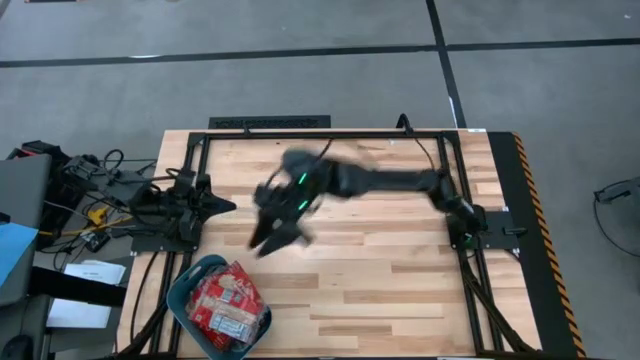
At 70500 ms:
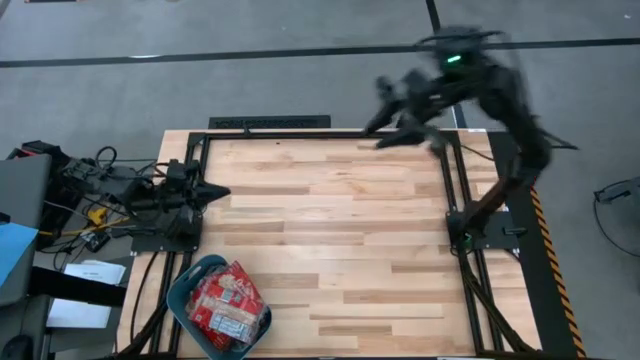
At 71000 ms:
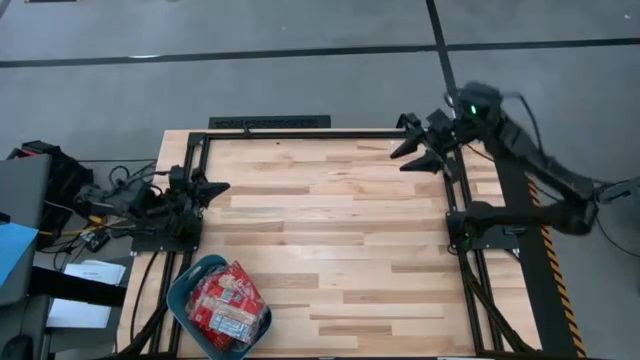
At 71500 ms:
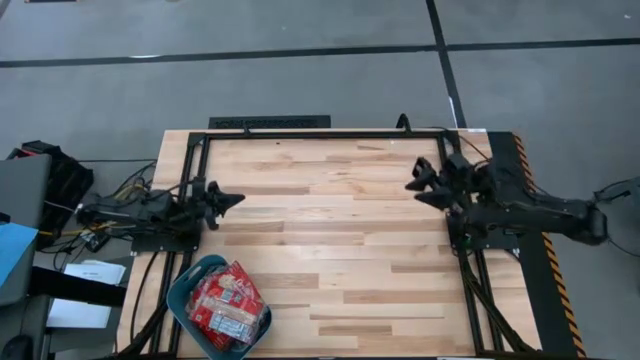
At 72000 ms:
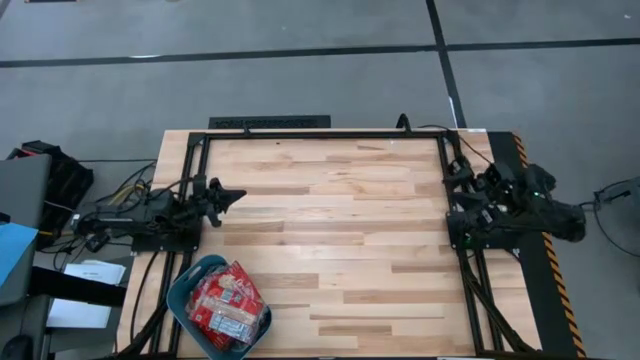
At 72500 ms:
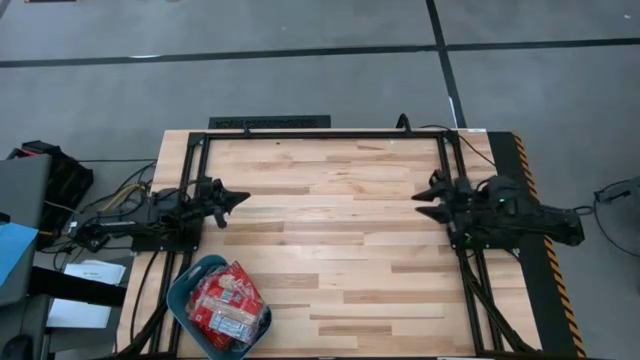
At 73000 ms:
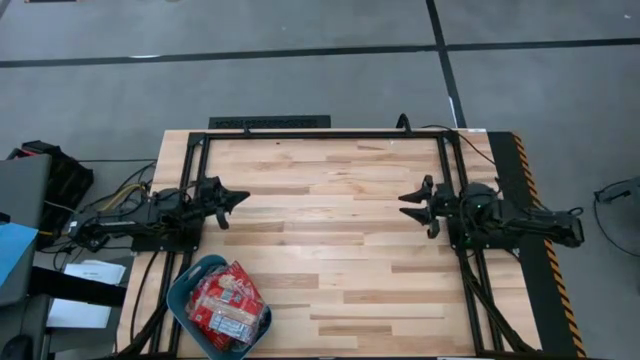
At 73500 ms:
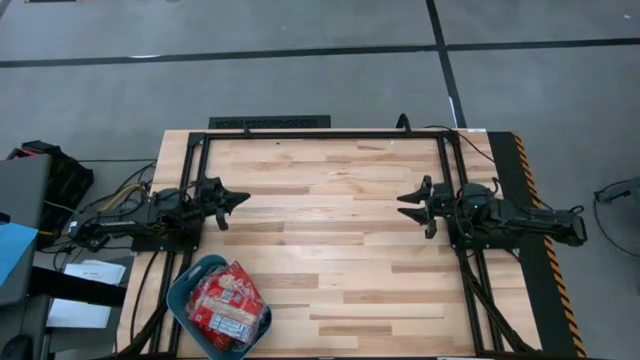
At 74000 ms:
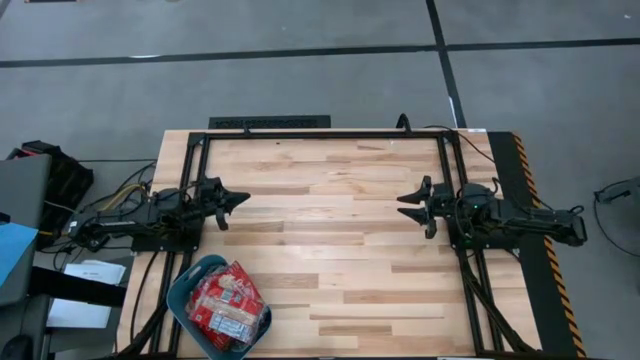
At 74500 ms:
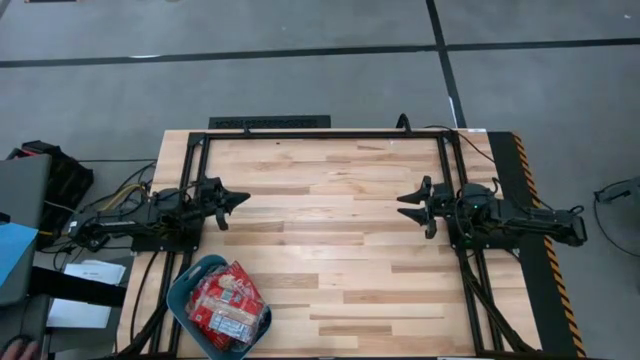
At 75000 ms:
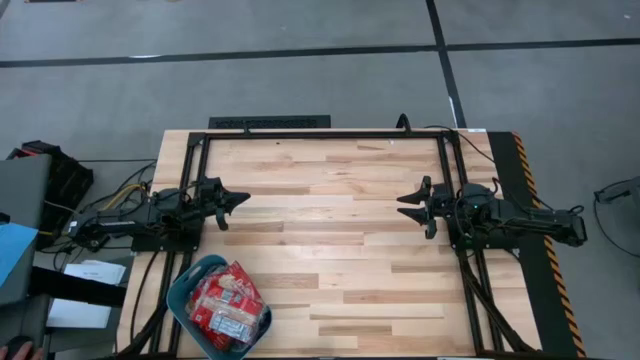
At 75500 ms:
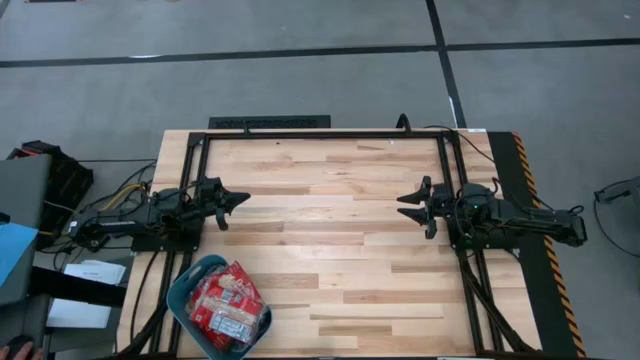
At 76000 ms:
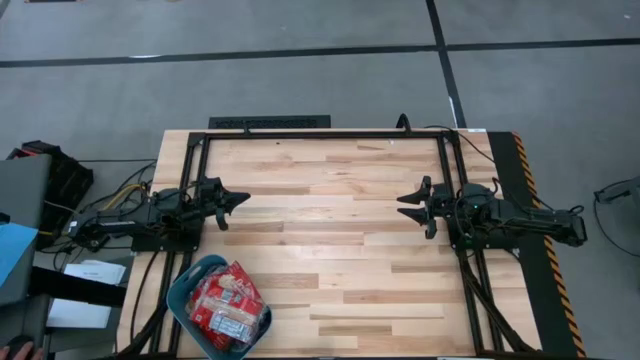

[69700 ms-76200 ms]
Task: Sort popcorn bags into baskets
Return to Home Position

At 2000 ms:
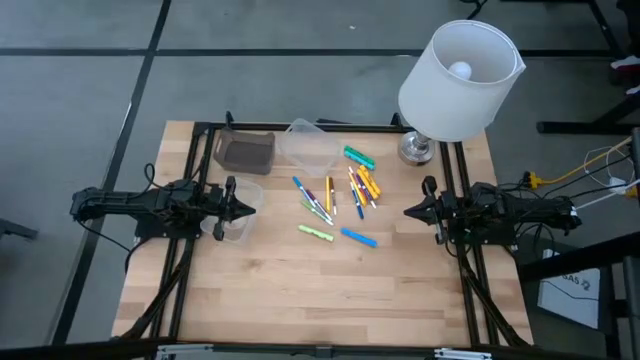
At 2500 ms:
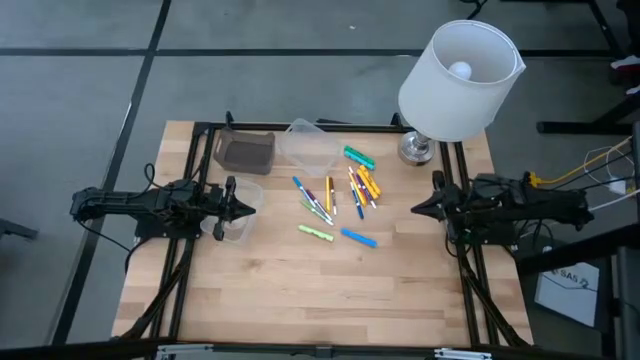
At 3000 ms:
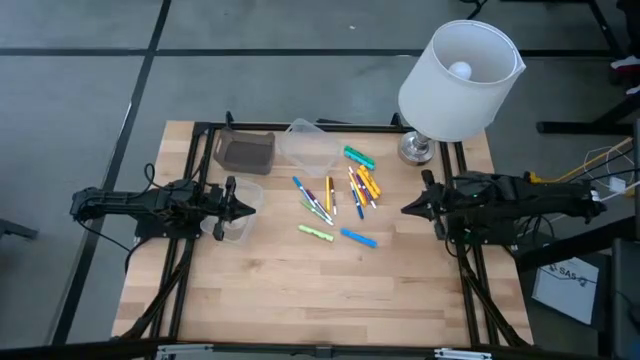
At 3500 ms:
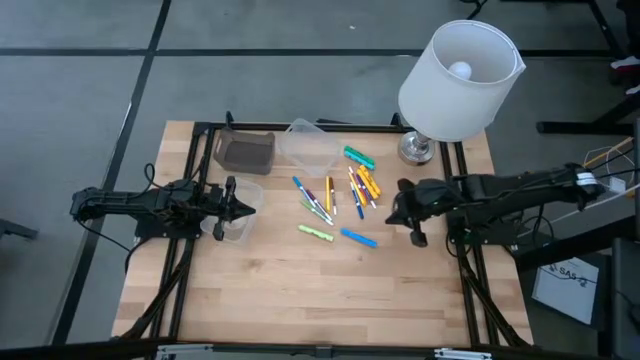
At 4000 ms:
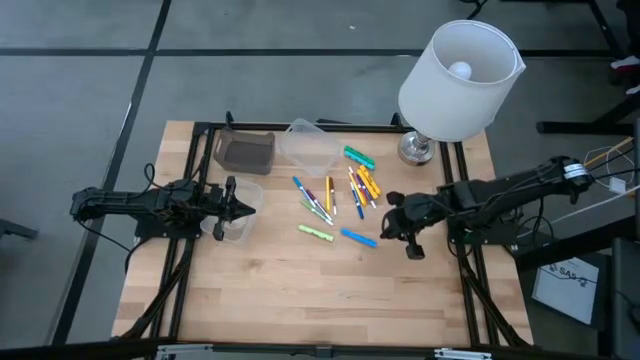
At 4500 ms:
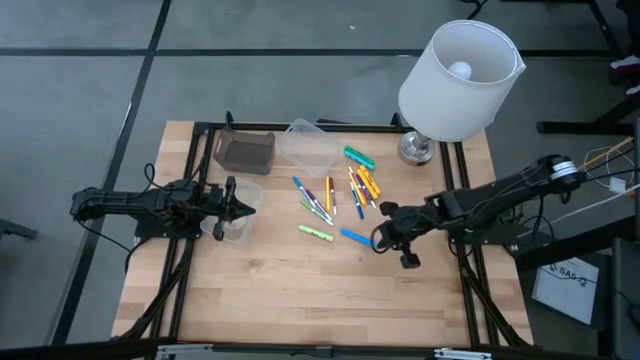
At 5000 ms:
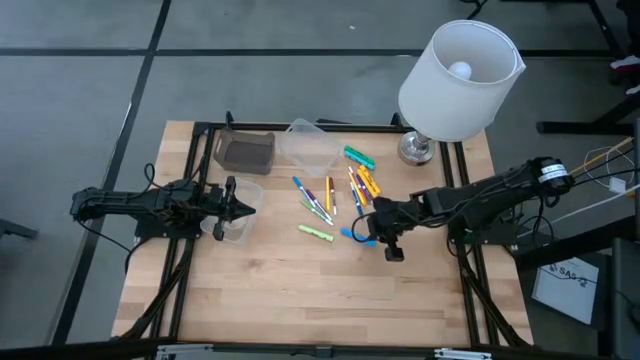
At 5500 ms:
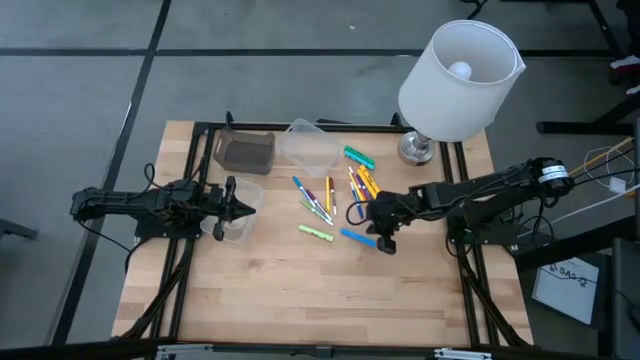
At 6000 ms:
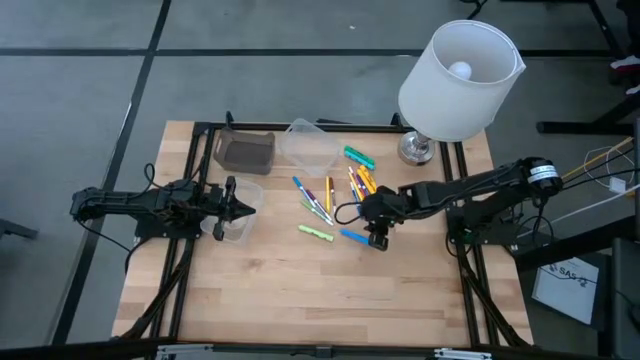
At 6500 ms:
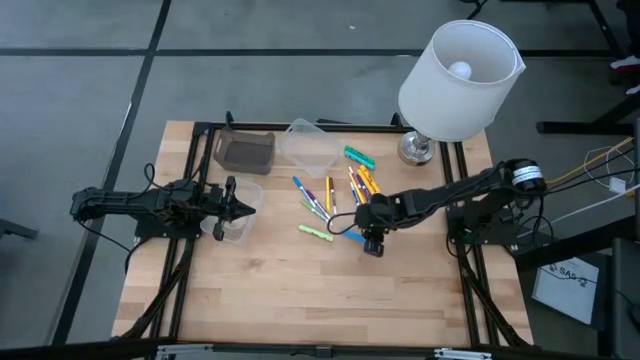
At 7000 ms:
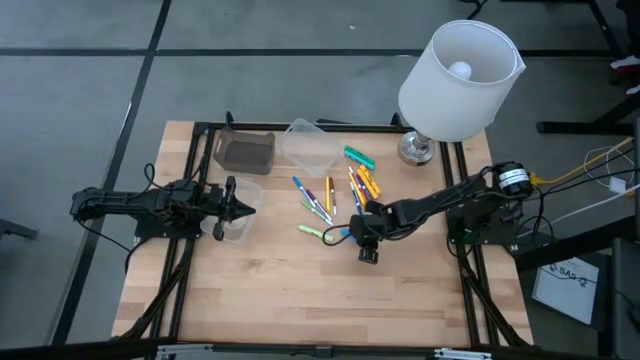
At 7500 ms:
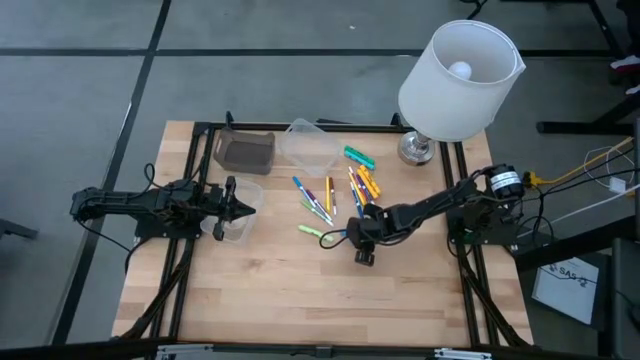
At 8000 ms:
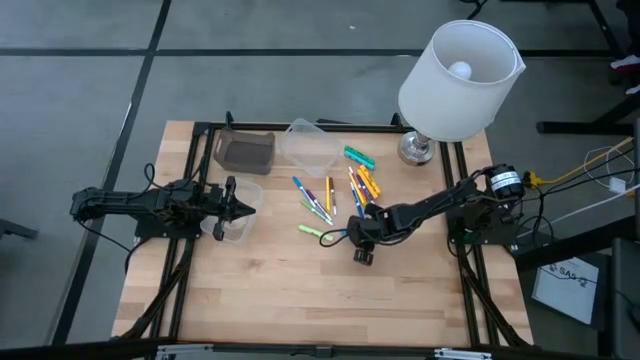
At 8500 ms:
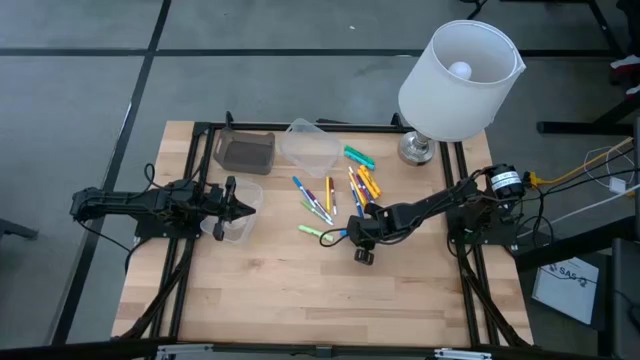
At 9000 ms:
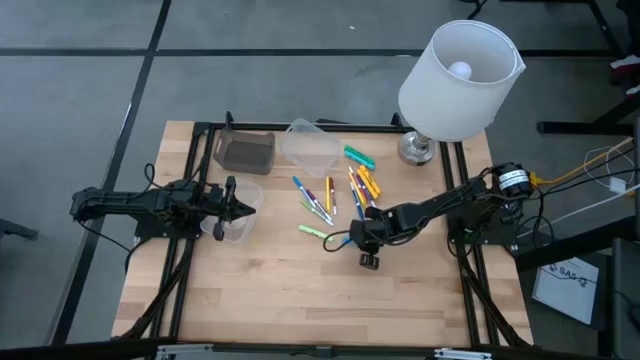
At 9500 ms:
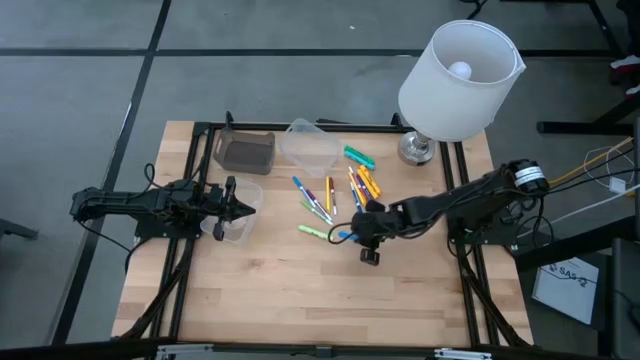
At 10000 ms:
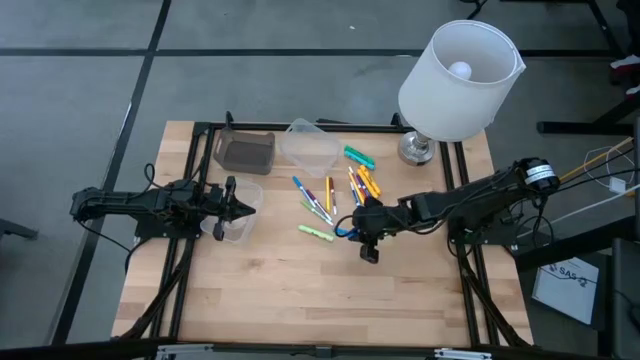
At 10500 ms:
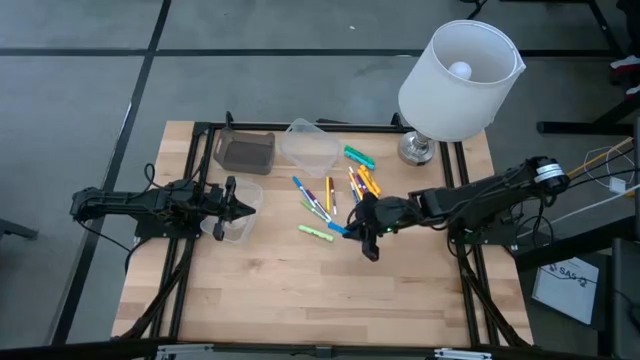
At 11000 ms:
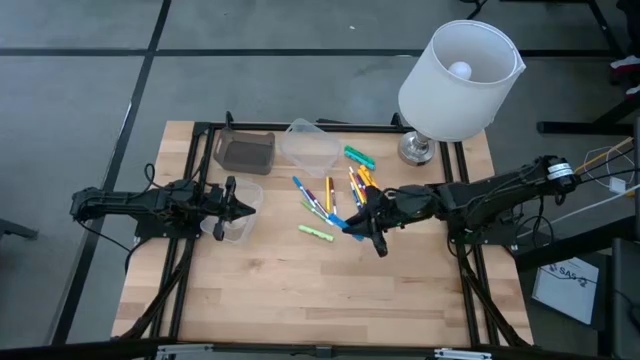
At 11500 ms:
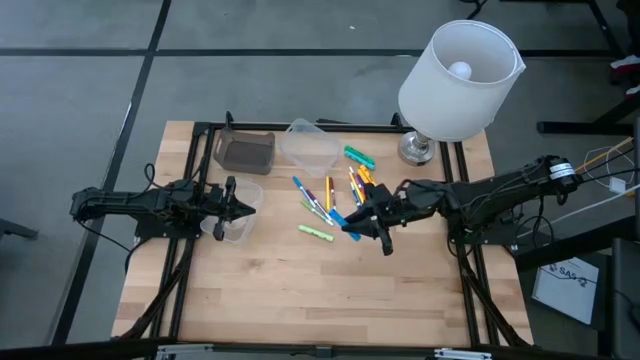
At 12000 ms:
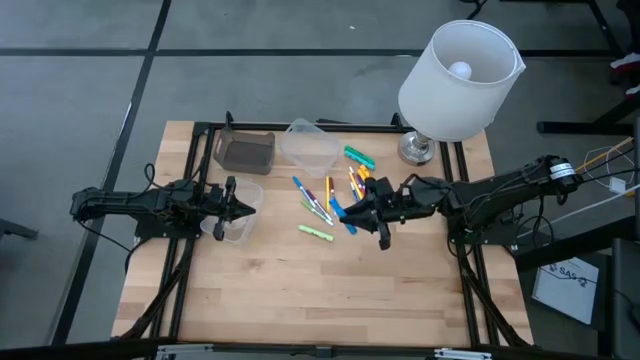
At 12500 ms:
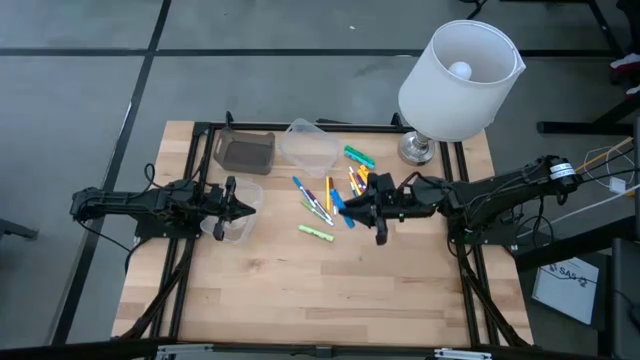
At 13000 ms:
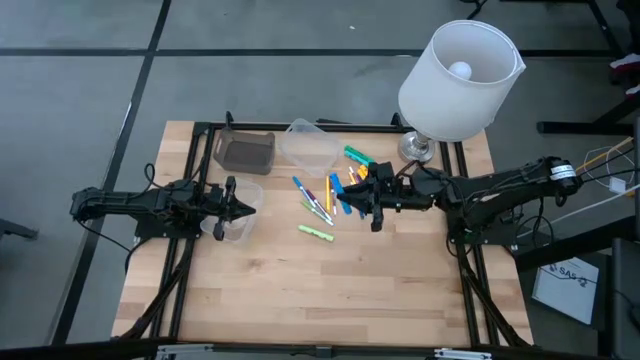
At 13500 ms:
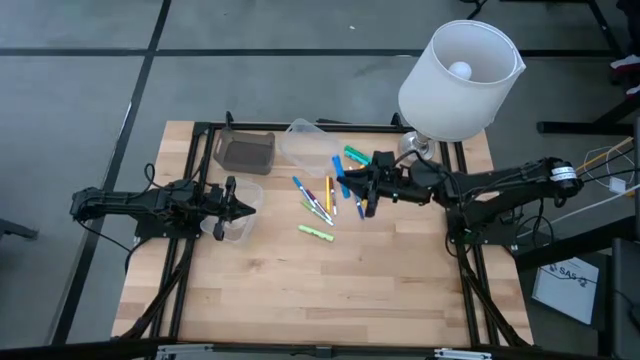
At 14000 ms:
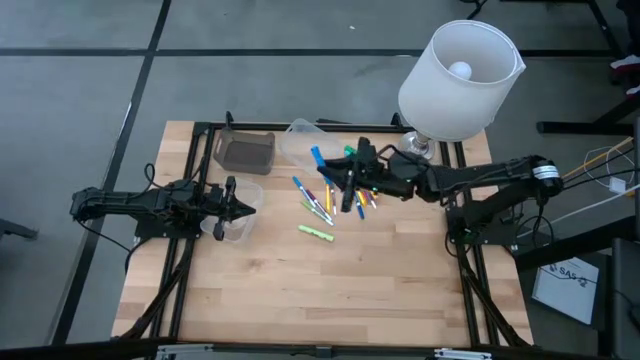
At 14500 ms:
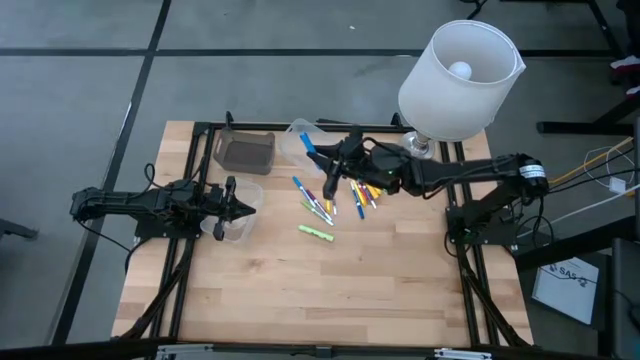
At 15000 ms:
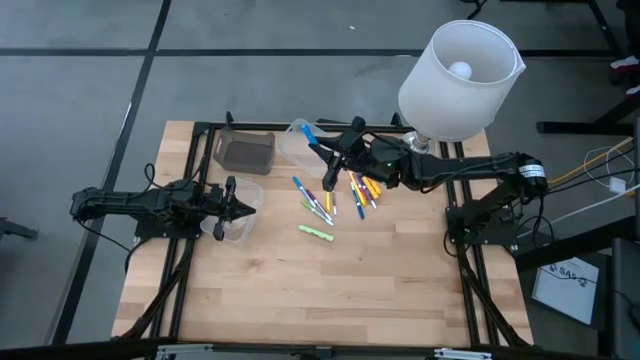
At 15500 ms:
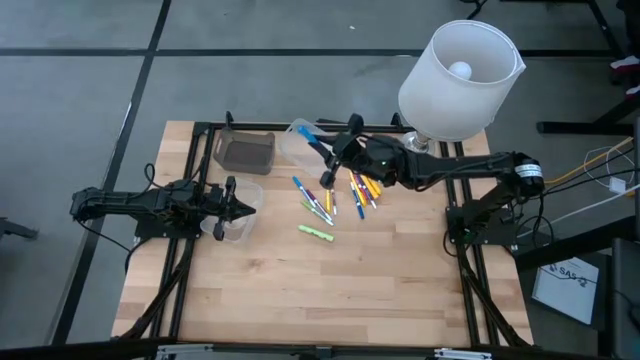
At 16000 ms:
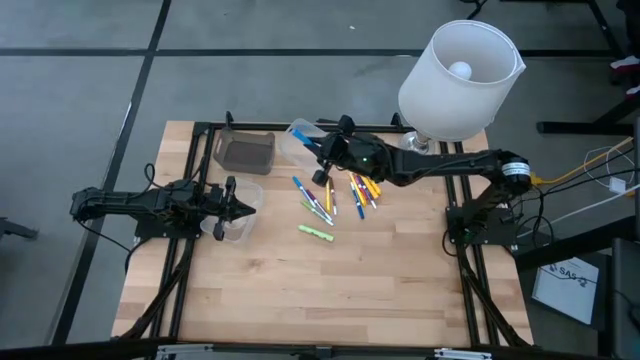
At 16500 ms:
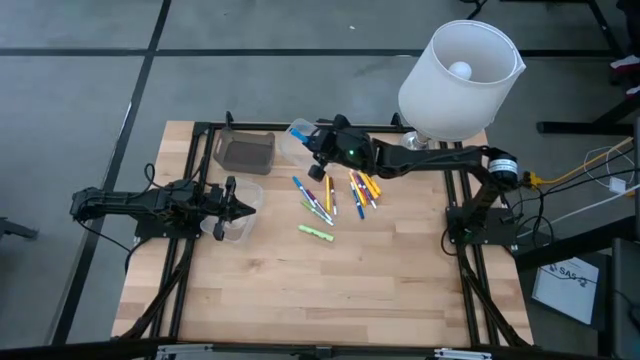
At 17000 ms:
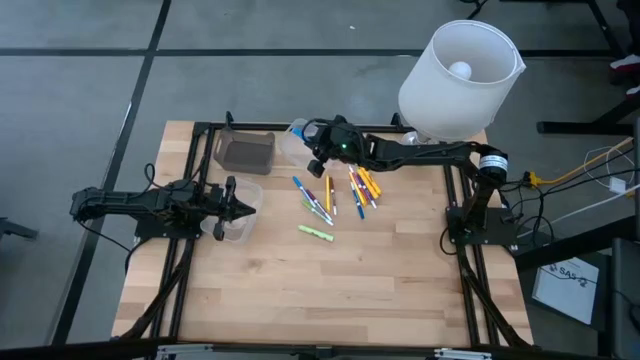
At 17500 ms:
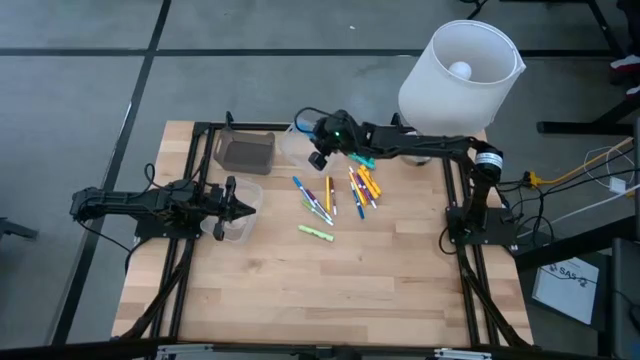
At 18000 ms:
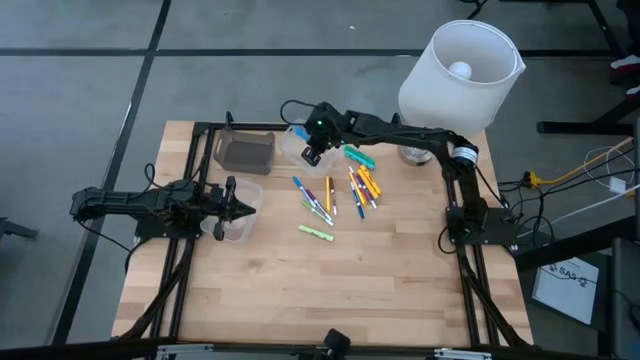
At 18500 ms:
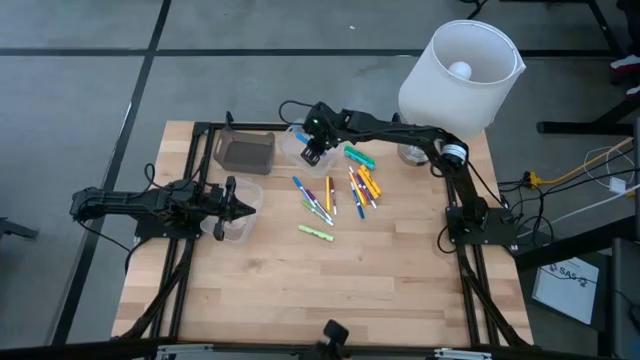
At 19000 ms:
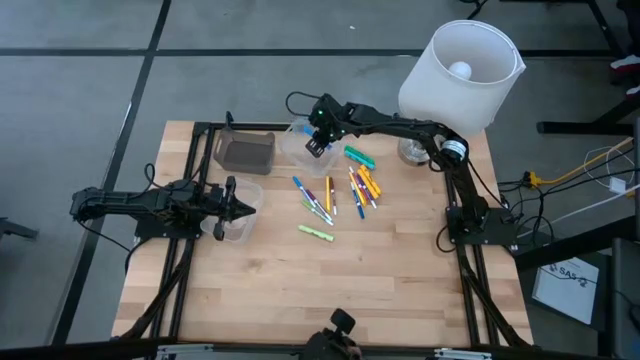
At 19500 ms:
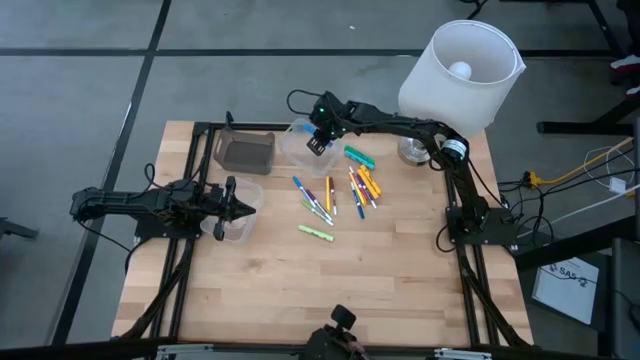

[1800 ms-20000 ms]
Task: Pick & Place Markers
Put the blue highlighter into the top transparent bin
